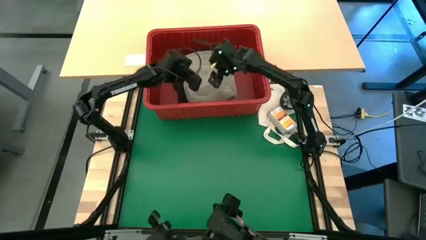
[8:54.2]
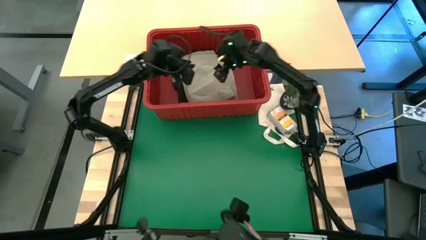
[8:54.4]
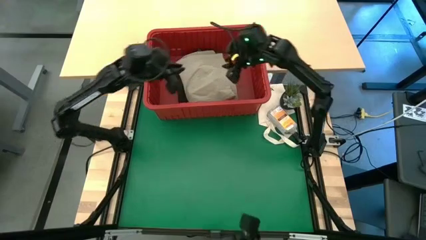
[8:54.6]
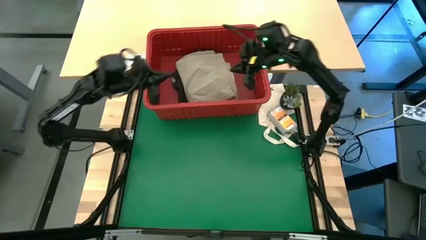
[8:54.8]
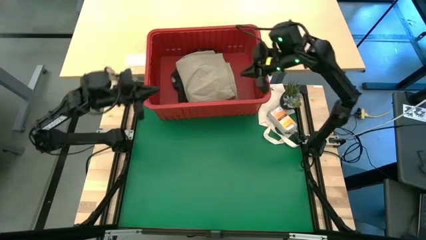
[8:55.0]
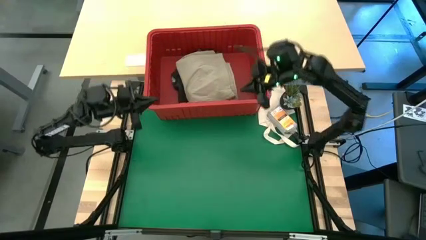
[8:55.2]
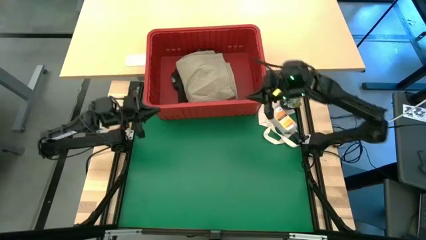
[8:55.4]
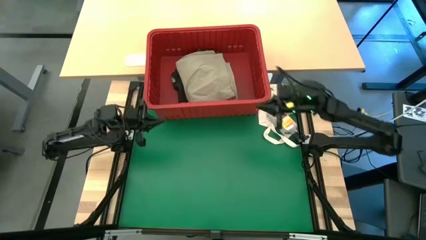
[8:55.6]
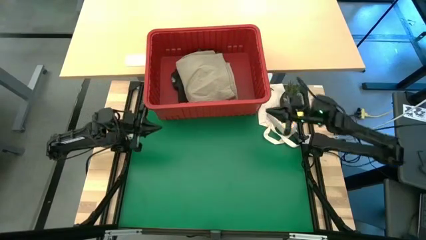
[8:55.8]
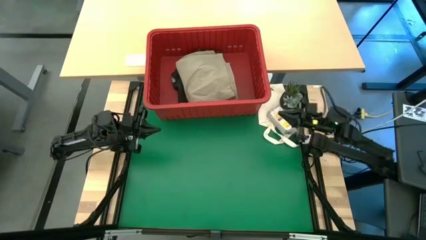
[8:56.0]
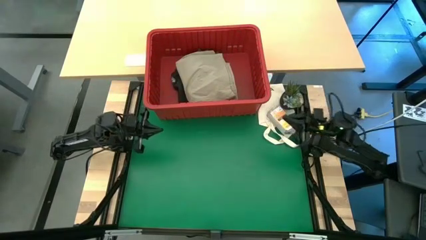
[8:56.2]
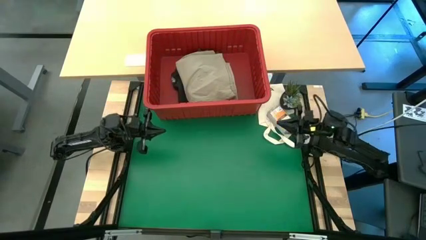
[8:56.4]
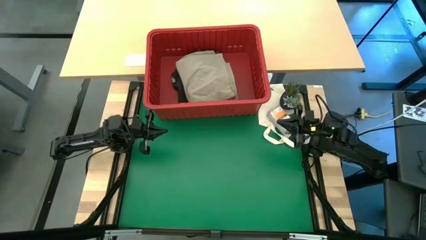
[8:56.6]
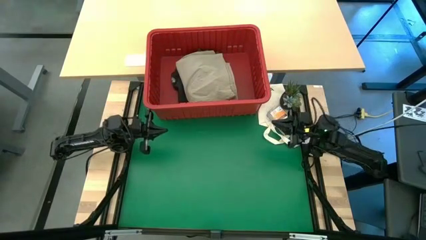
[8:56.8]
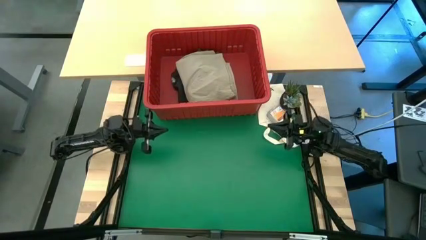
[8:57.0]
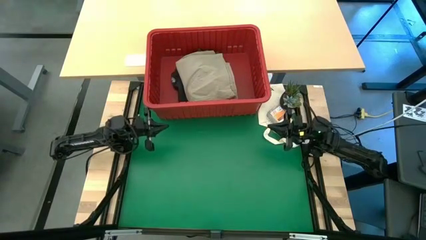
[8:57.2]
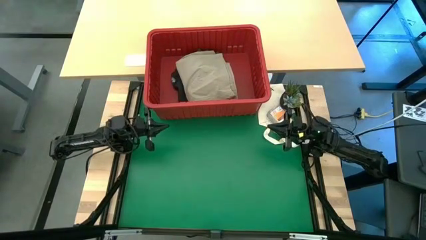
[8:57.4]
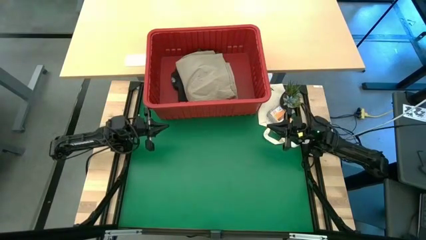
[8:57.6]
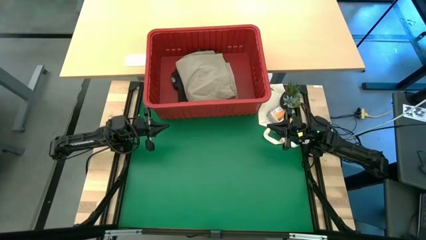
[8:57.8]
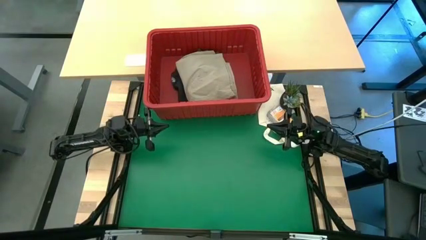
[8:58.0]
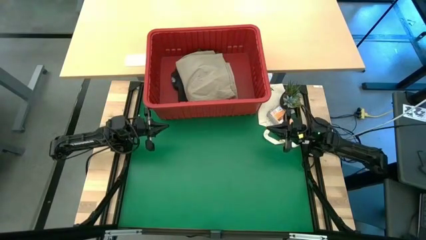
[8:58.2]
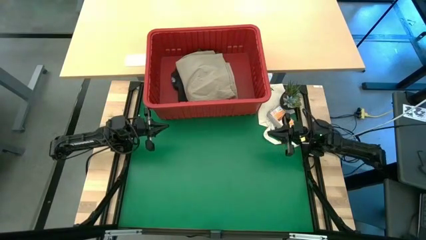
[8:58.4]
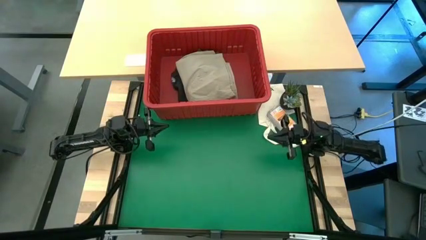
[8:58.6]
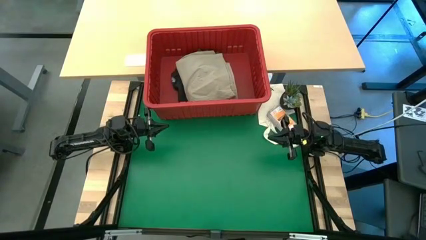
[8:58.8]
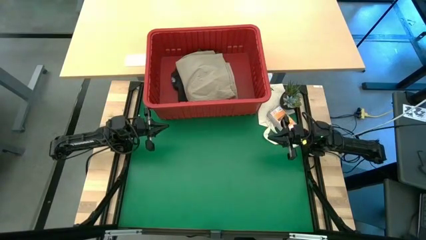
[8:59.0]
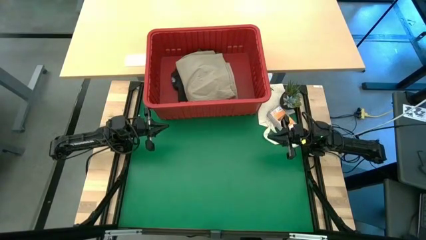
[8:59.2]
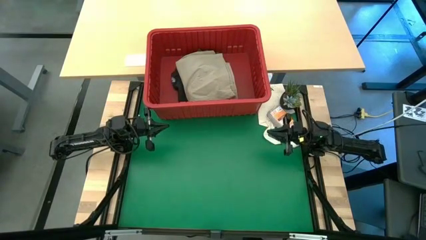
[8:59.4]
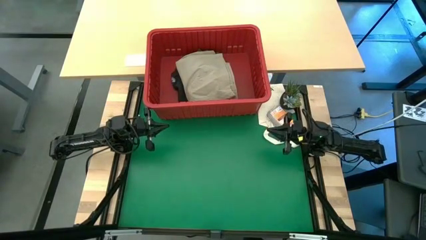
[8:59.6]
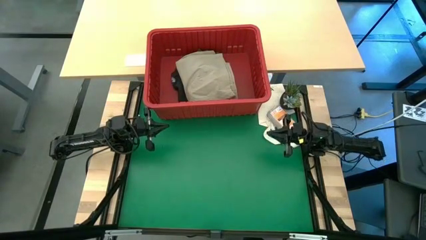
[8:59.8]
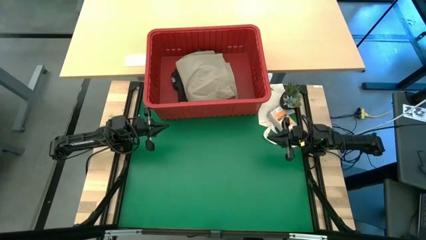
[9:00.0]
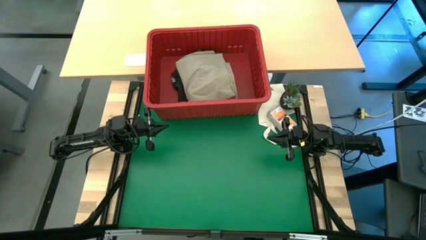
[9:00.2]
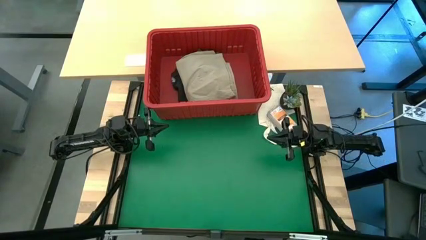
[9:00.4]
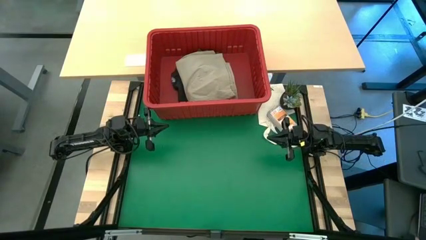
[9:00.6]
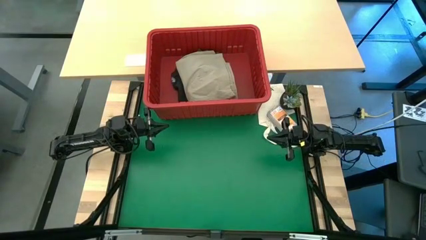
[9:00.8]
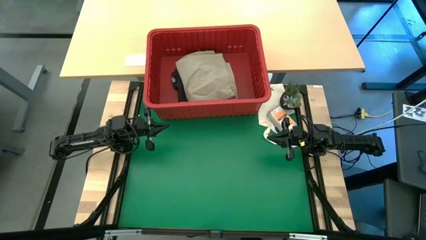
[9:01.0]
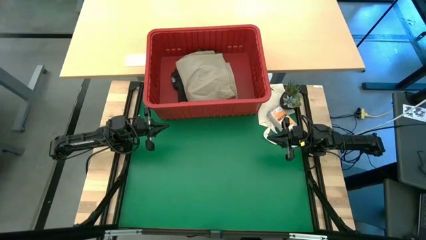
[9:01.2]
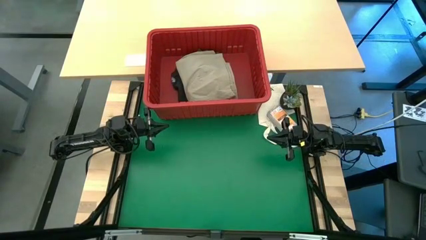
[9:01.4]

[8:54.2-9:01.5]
Task: Fold Laundry from Bin
Return to Home Position

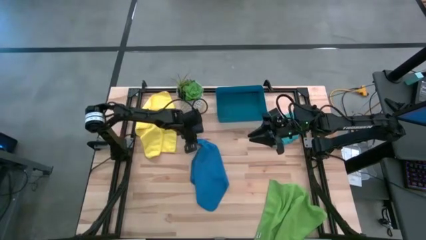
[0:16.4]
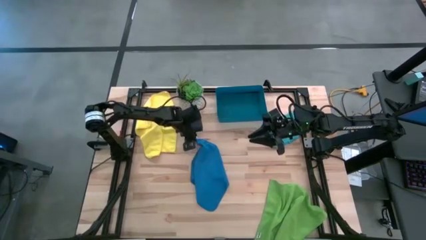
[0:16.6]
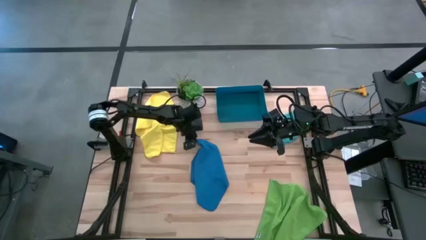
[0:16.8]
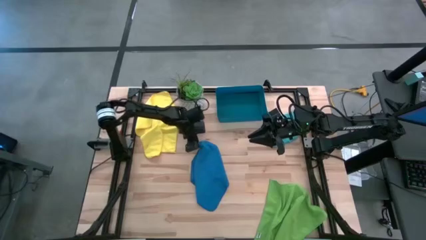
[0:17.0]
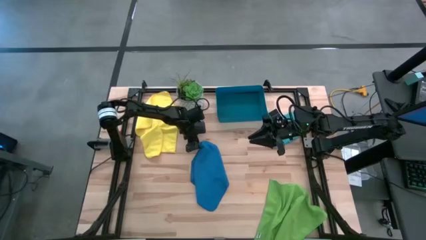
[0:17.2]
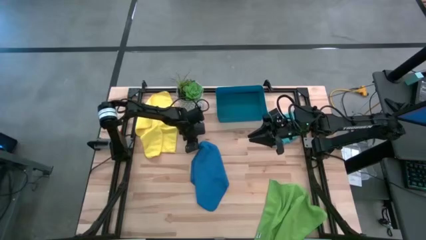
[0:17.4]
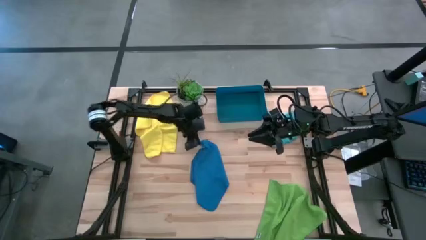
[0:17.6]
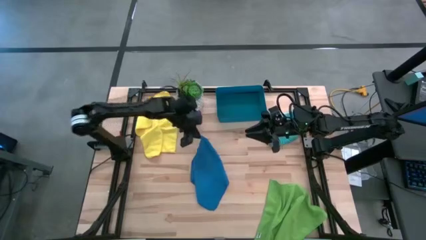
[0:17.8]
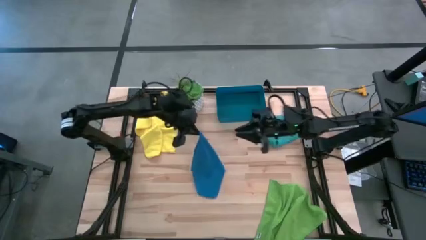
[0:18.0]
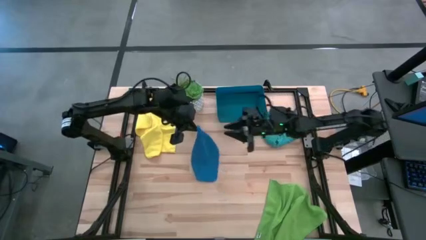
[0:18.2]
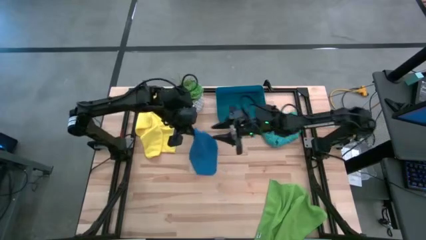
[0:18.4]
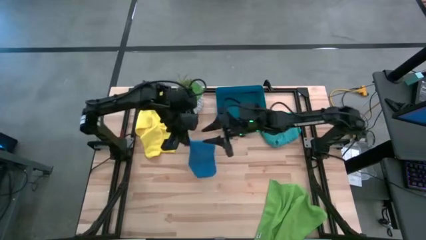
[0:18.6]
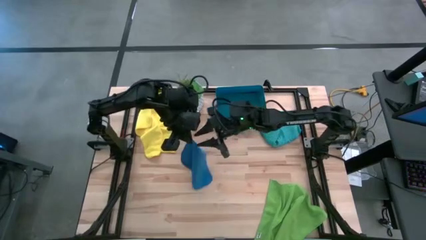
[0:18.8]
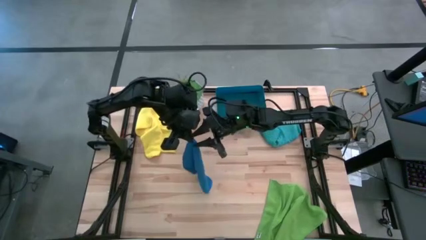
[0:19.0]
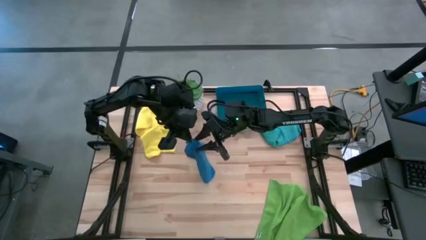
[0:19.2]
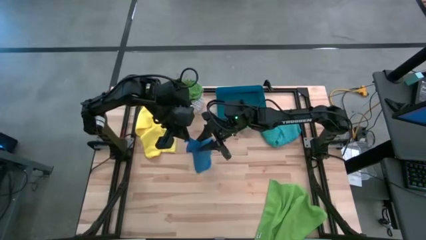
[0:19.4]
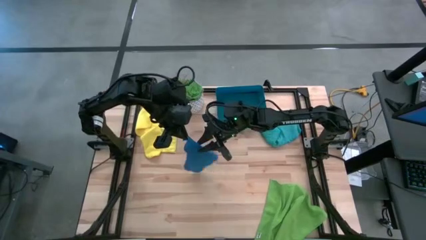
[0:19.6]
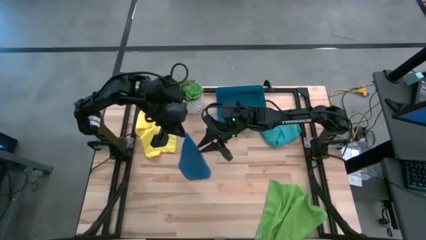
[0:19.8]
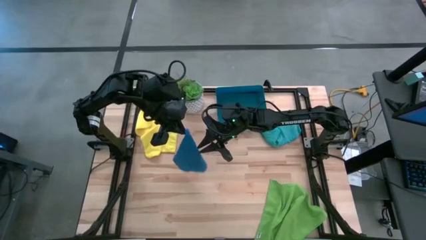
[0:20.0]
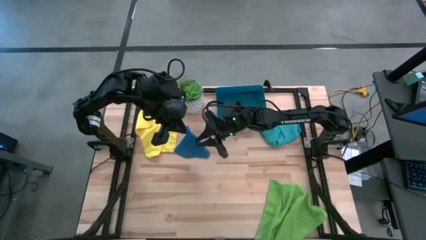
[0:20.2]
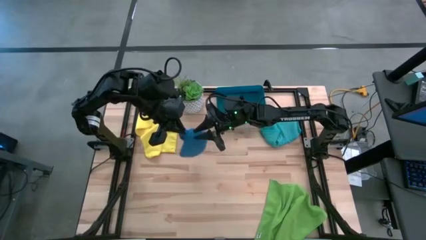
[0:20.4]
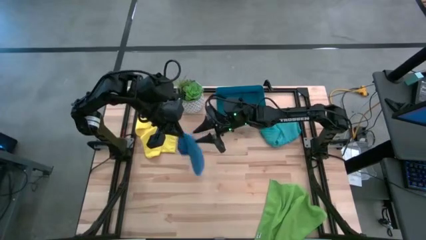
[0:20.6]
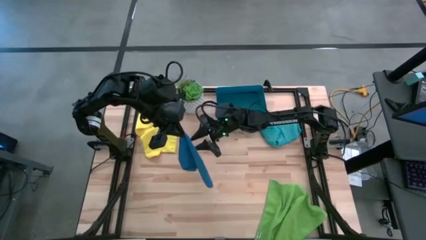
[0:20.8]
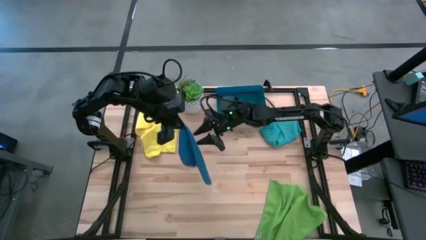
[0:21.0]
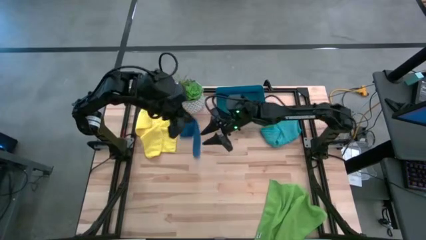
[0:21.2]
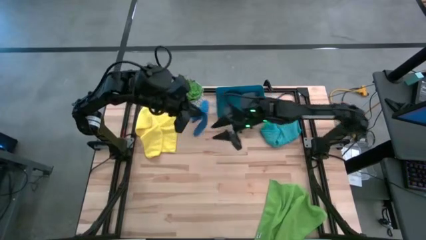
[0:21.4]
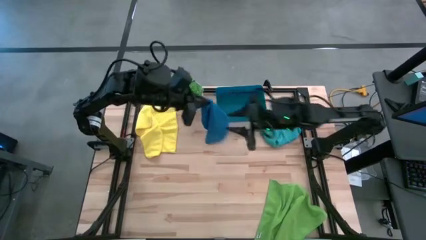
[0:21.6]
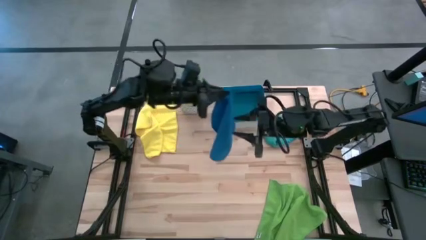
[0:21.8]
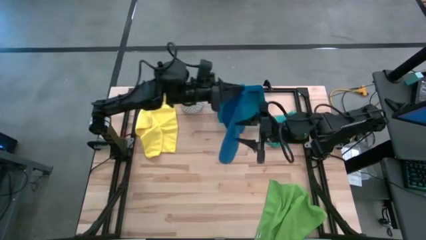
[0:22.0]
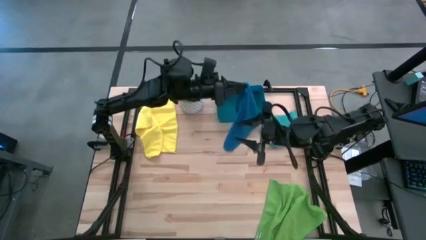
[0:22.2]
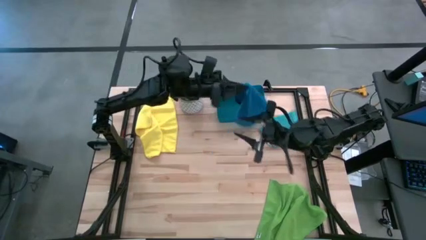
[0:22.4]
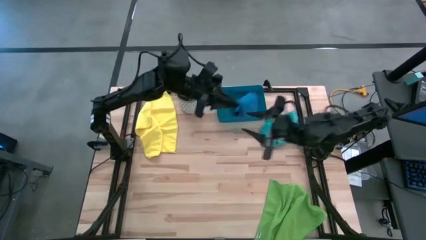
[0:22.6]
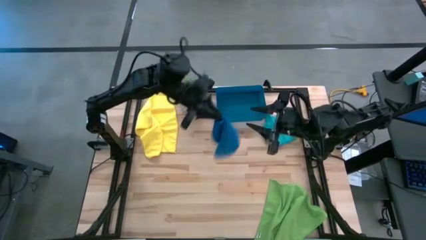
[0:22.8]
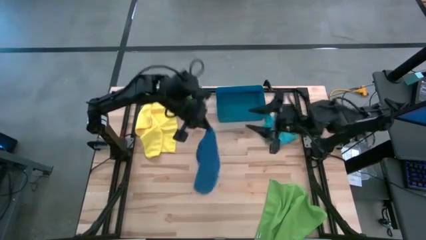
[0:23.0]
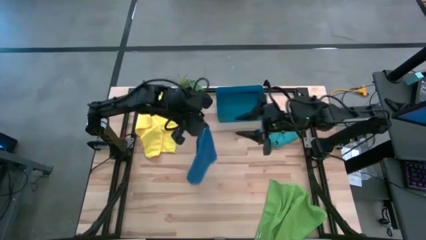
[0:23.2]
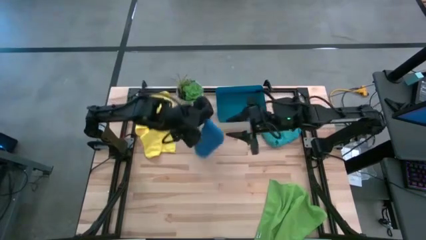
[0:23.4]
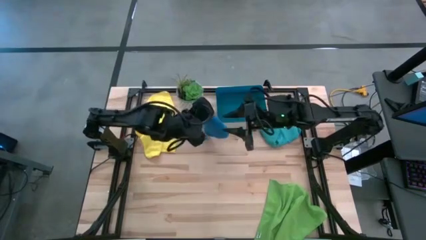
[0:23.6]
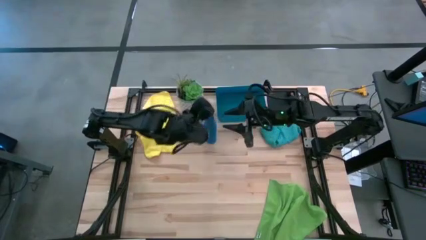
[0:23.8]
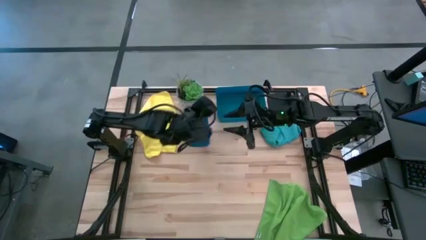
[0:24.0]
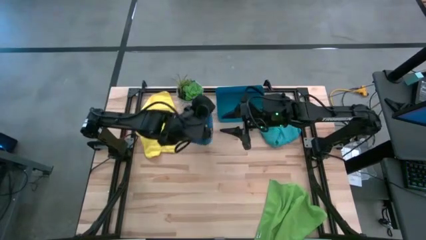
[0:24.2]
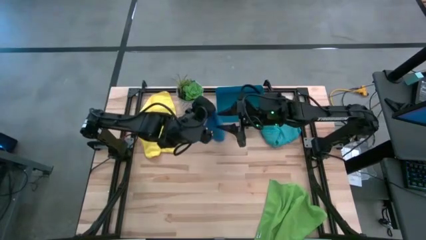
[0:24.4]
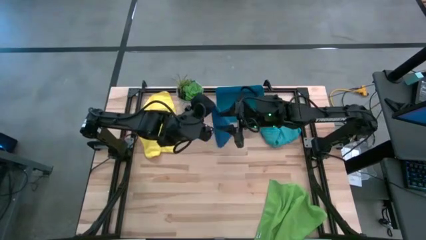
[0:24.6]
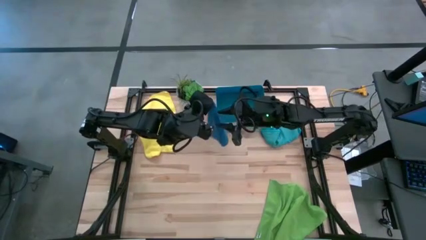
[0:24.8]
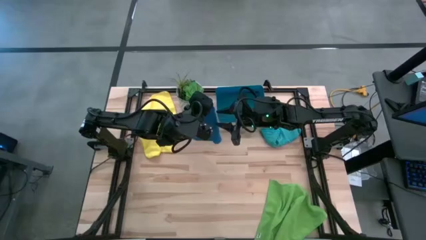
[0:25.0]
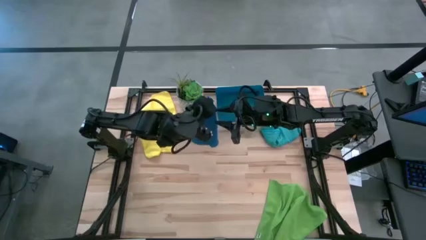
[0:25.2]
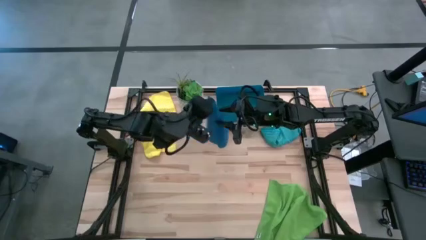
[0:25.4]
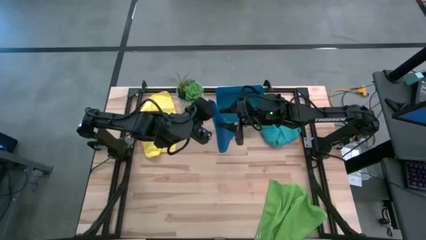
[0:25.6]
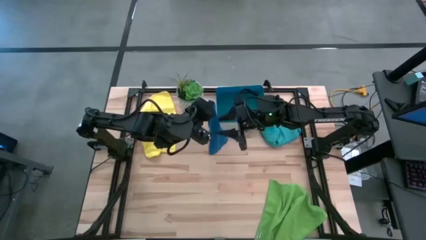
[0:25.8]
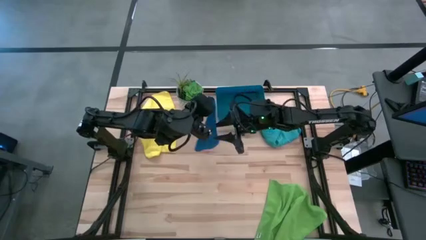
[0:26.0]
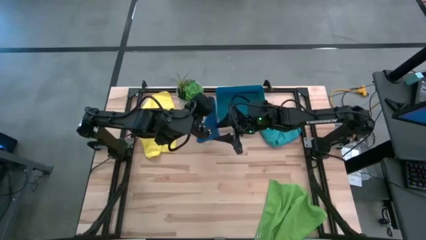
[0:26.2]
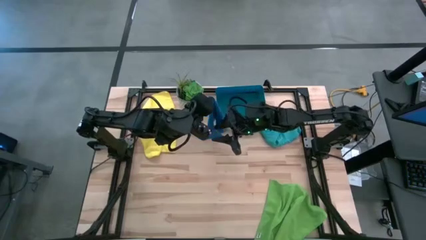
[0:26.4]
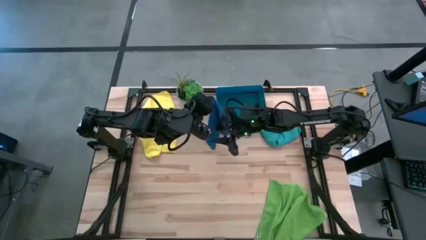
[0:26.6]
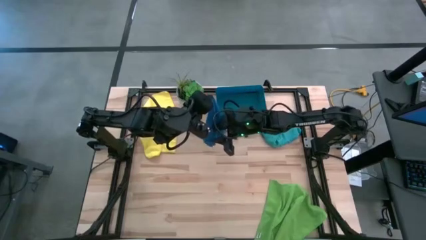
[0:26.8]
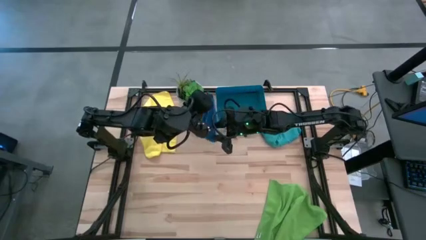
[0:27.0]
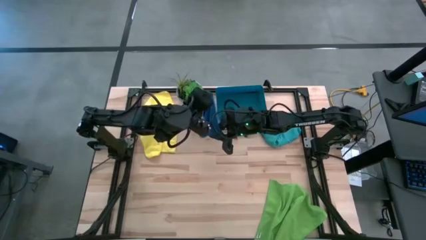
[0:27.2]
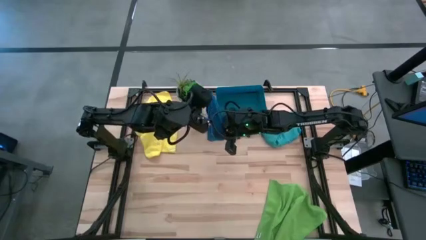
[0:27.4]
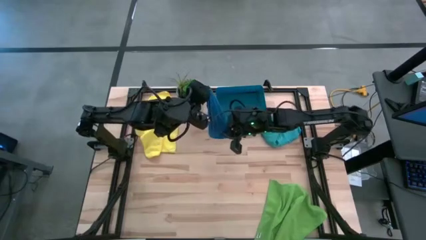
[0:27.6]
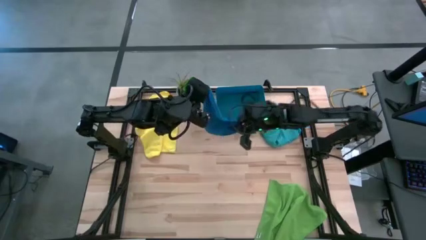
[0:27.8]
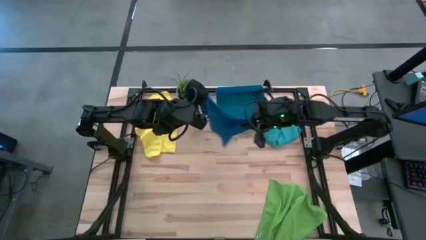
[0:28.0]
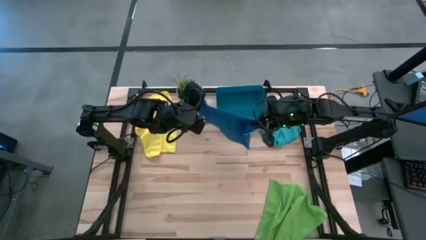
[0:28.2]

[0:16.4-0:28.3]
Task: Fold microfiber towels
Fold the dark blue microfiber towel into the dark blue bin
